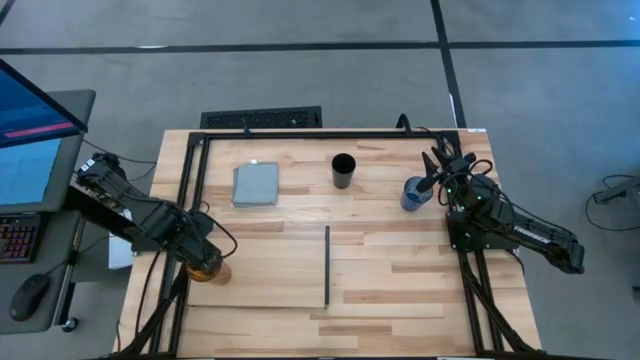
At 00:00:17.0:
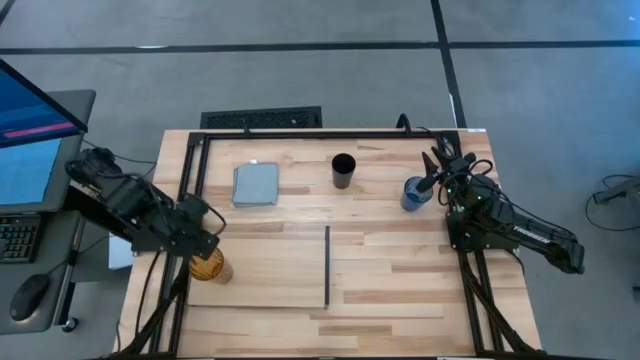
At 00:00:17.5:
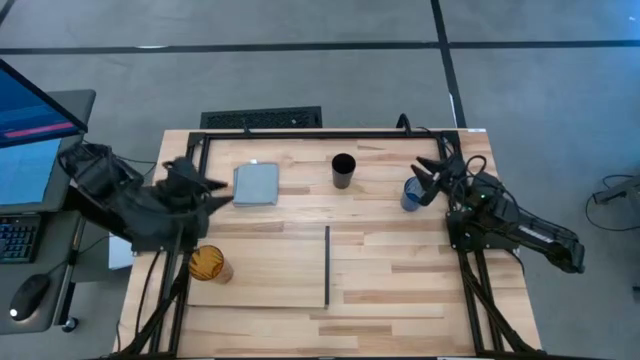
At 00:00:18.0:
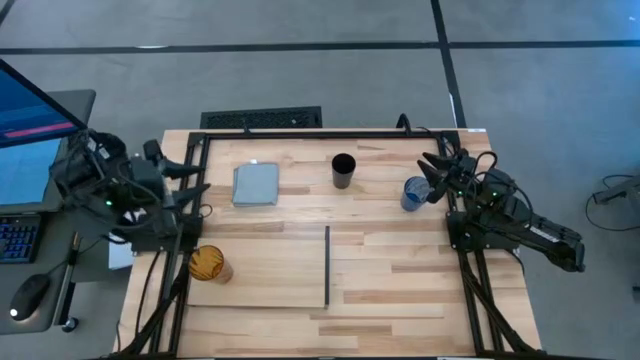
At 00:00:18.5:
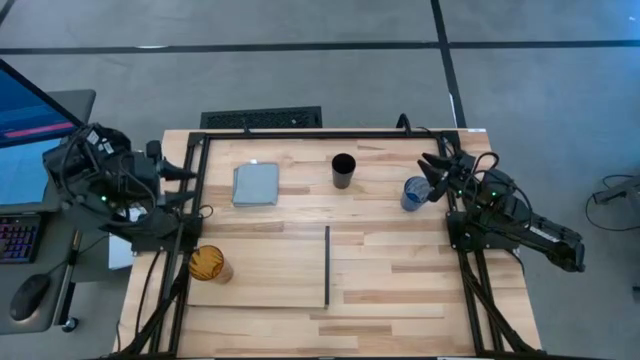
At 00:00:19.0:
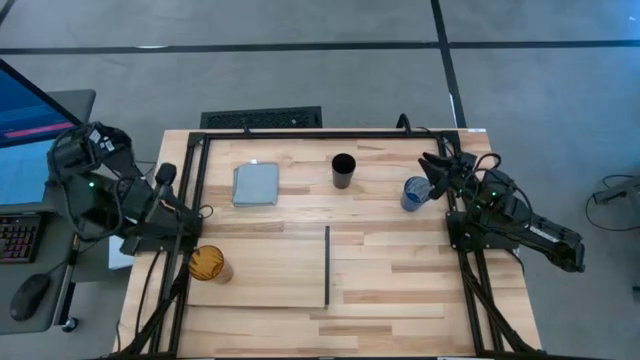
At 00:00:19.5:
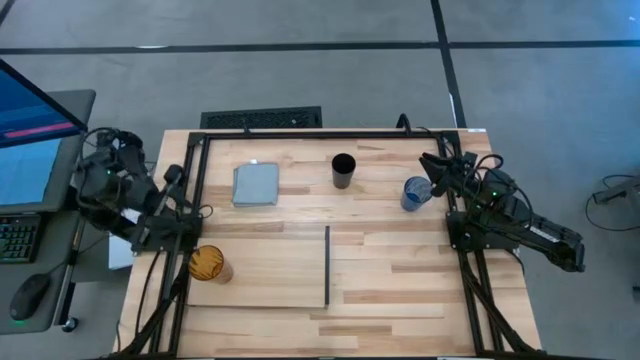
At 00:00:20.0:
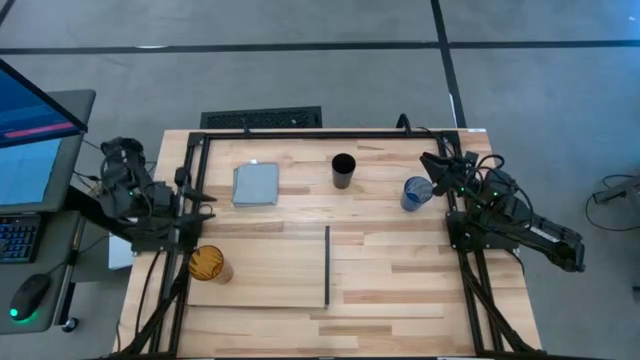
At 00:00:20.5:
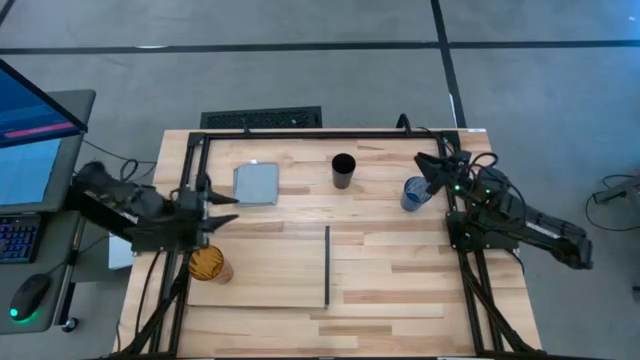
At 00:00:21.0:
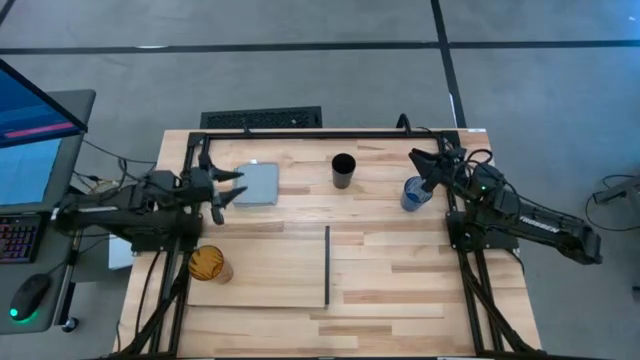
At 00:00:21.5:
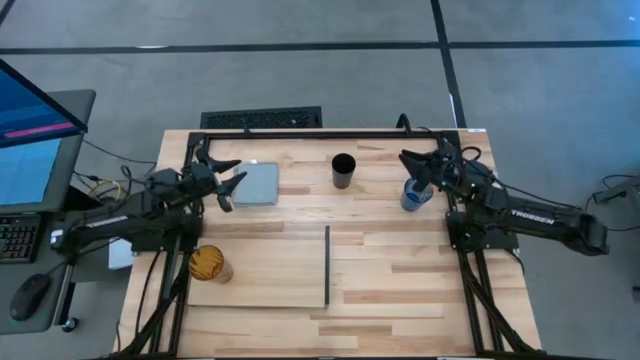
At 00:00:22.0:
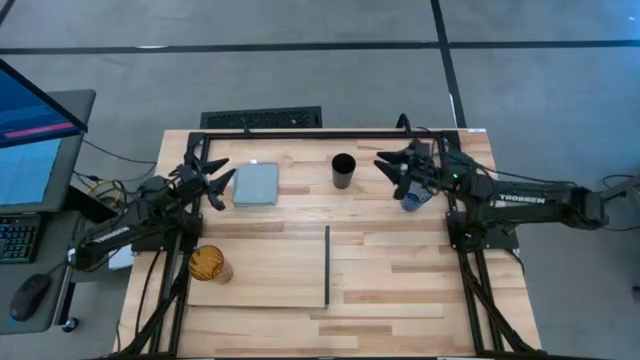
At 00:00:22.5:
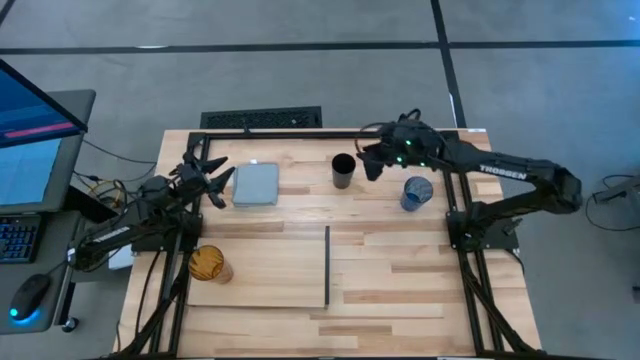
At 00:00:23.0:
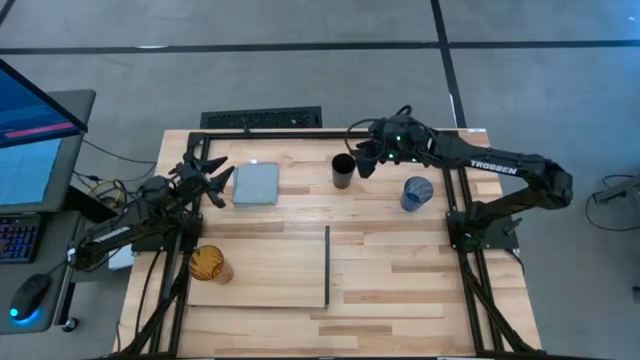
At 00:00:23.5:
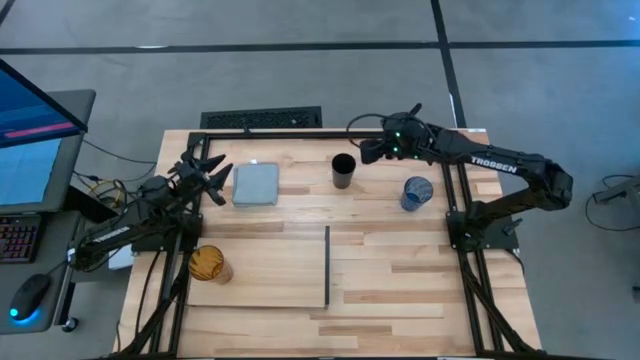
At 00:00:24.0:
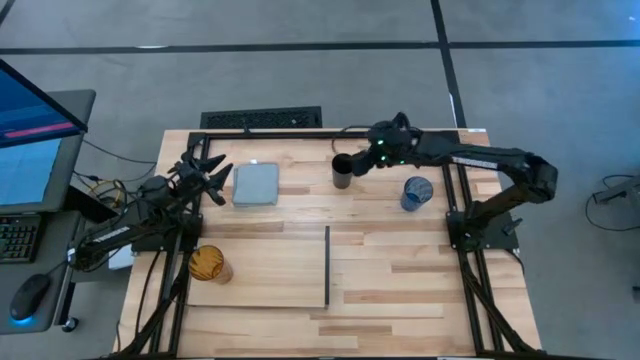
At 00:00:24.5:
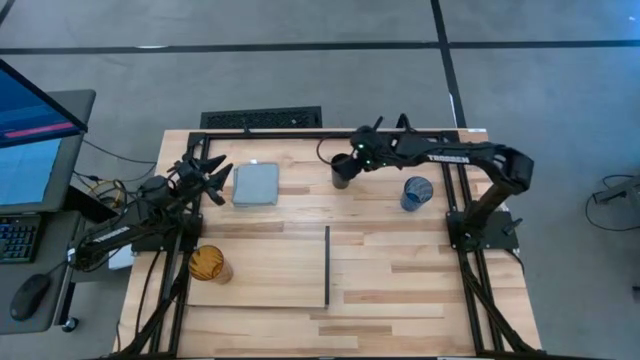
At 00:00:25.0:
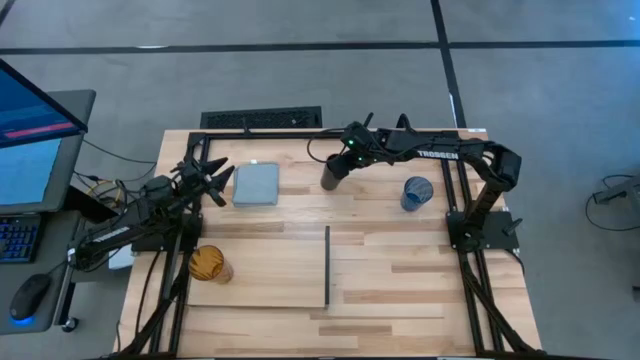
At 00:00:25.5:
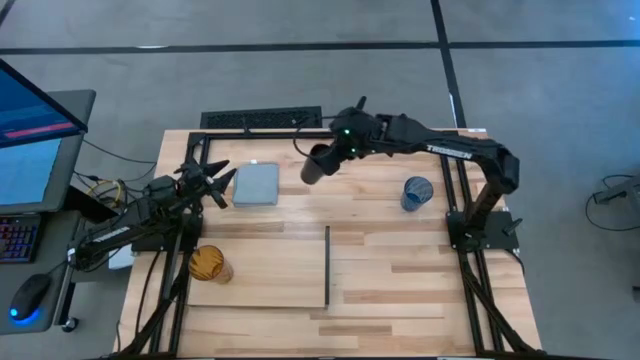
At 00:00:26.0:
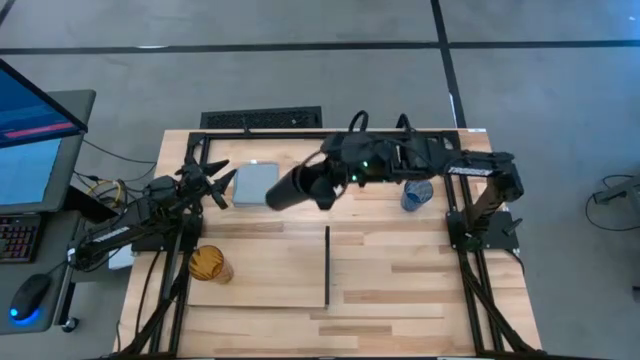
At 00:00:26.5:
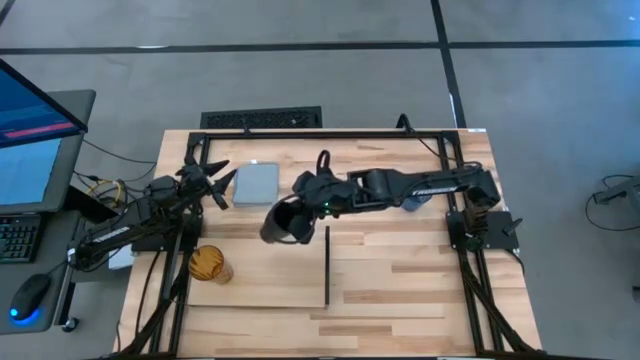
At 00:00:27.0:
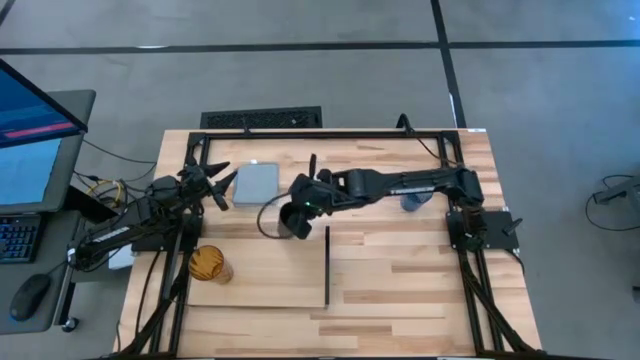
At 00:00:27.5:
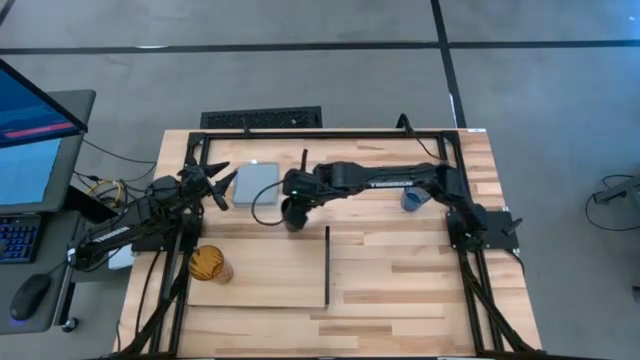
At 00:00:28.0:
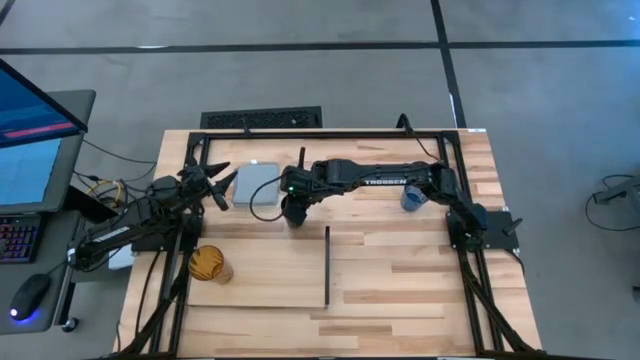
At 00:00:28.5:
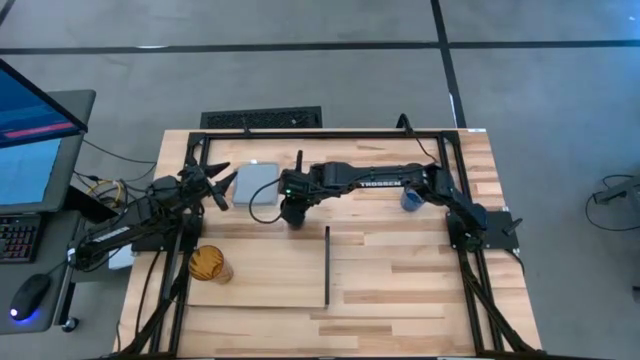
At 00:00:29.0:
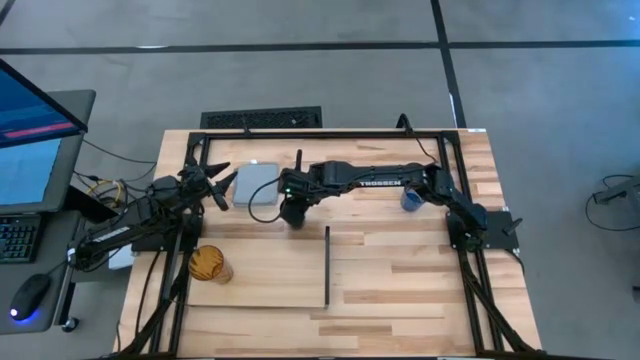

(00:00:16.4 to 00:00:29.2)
Task: Stack small to large cups/mugs on shelf
Put the black cup on the shelf

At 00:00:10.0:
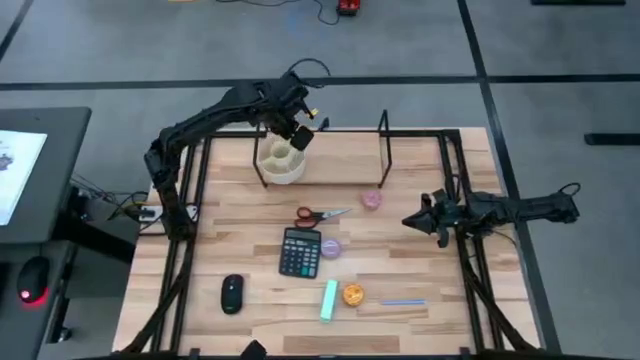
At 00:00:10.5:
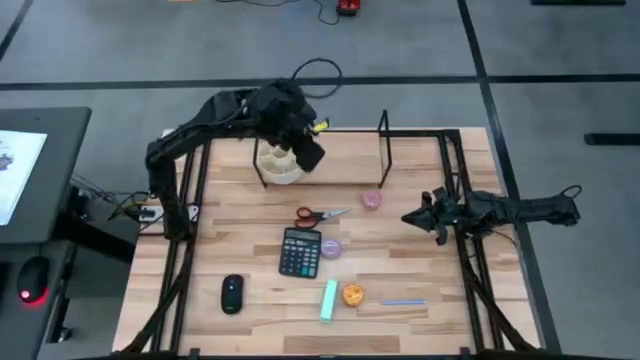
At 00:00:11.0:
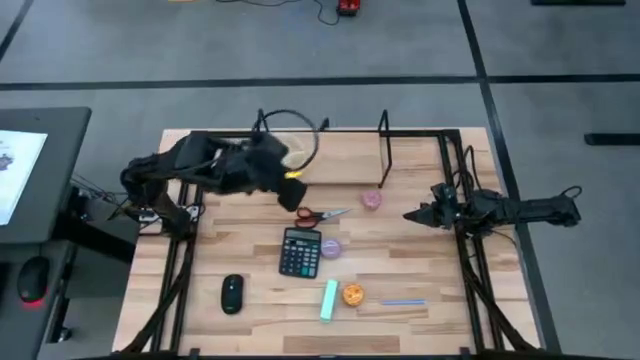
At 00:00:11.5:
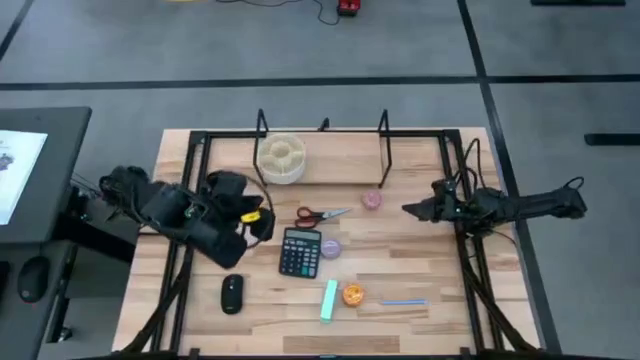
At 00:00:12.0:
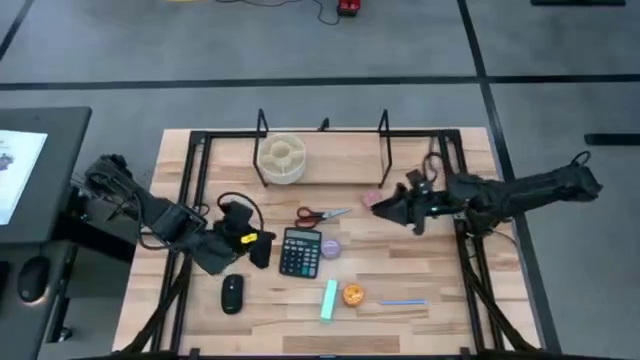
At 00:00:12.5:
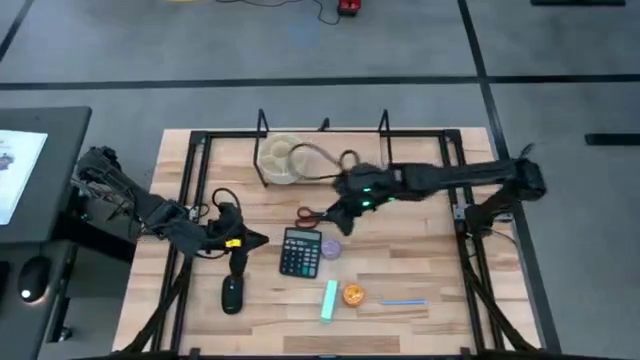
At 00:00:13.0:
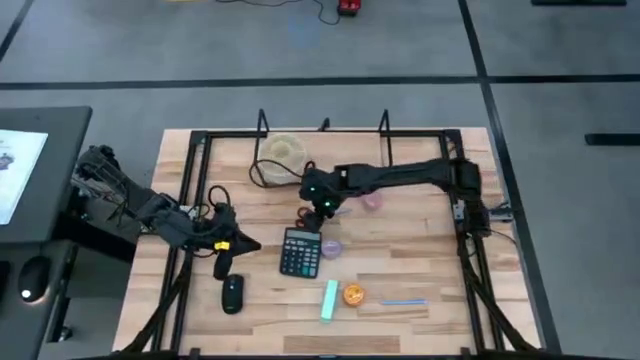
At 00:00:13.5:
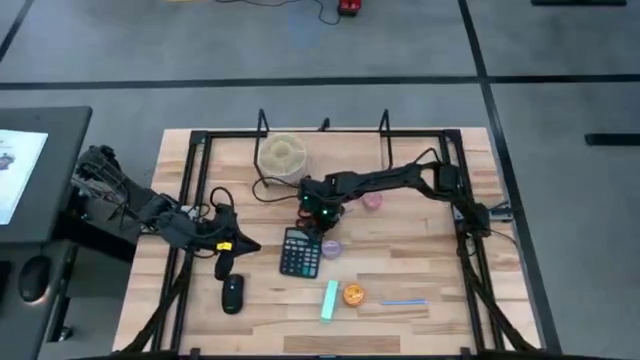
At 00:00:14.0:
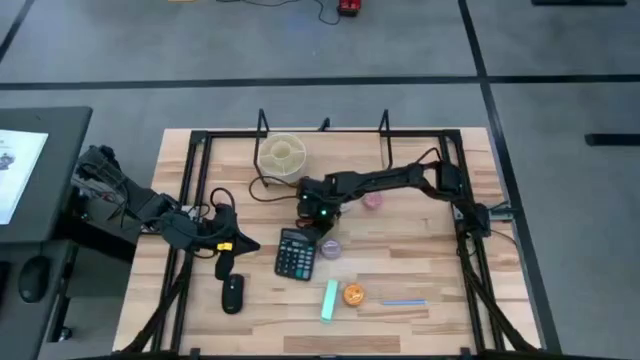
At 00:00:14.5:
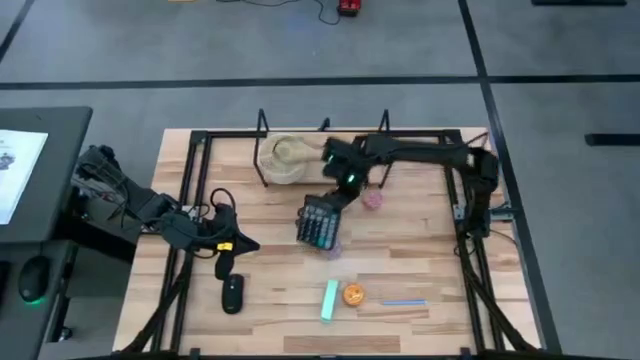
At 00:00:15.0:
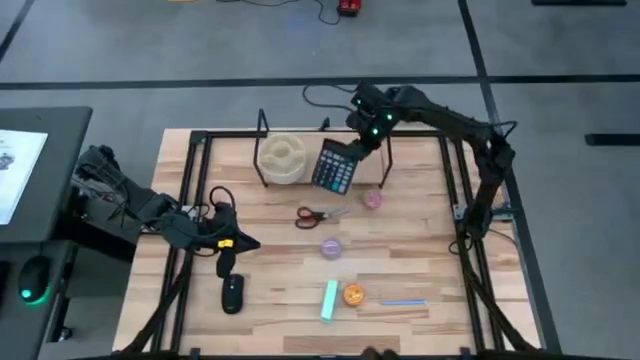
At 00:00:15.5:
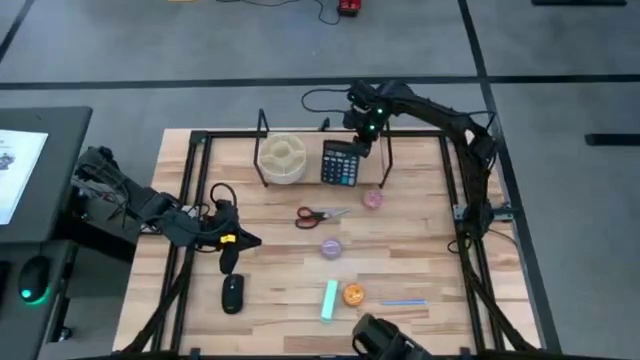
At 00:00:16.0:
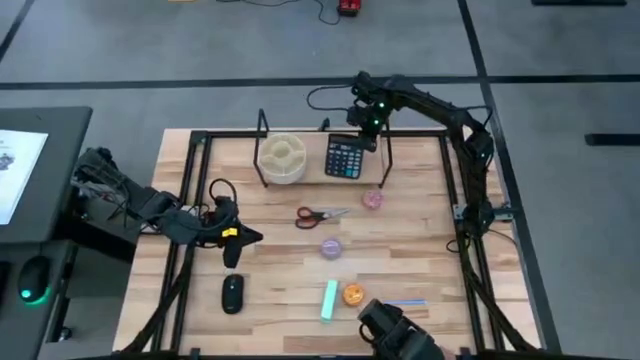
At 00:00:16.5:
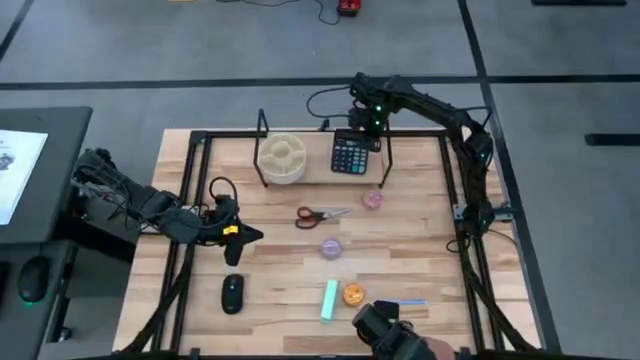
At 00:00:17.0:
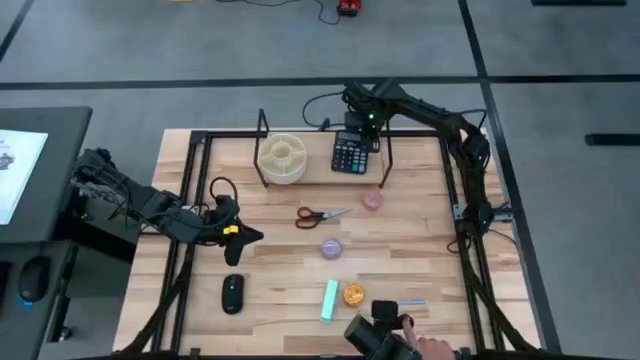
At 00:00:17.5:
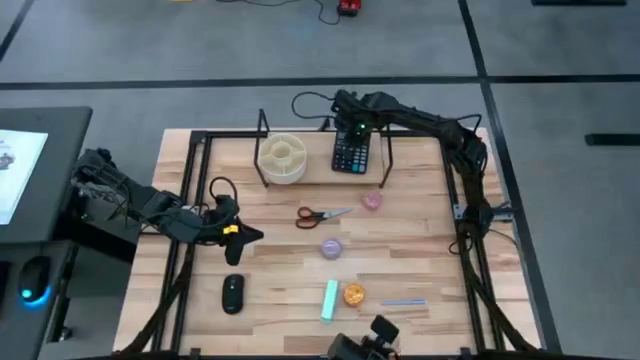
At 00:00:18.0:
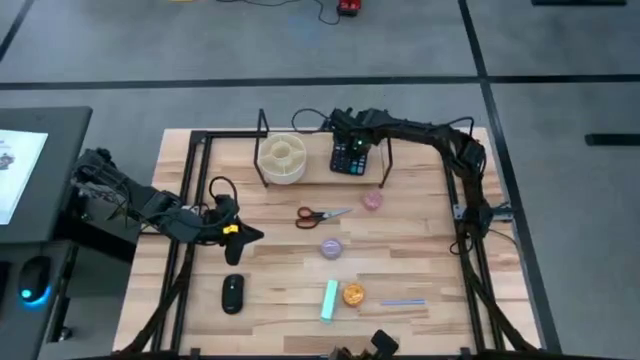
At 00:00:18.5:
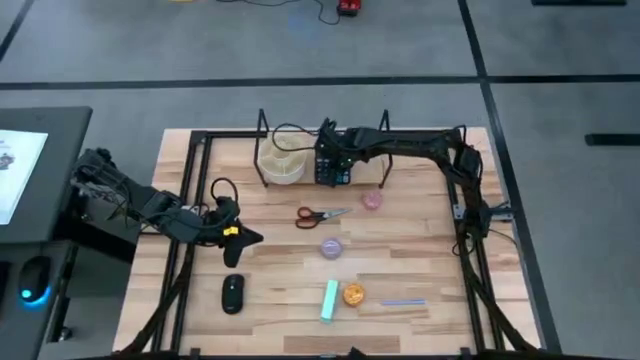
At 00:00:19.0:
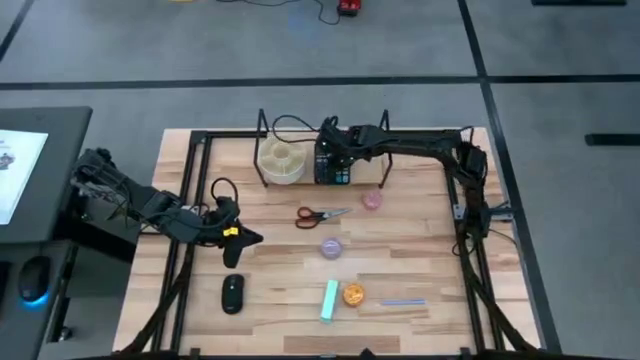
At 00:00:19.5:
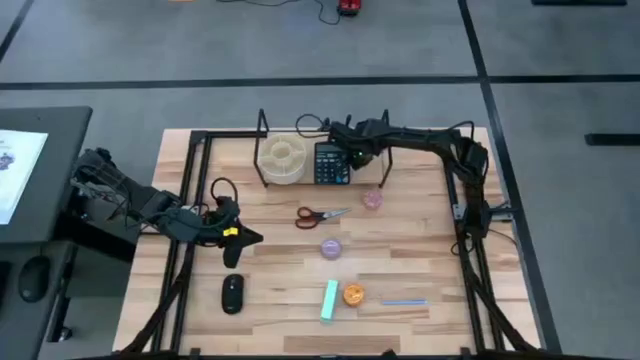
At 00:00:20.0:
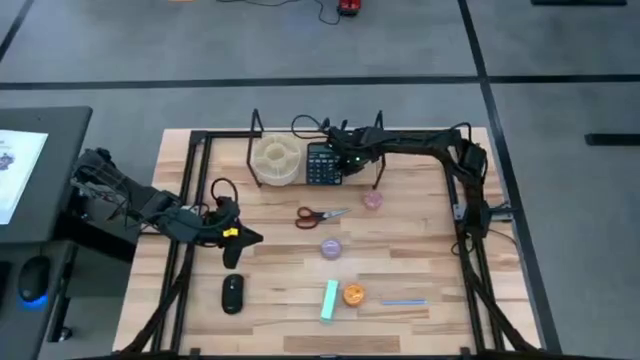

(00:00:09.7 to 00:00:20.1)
Task: Stock shelves
Put the black calculator on the shelf
